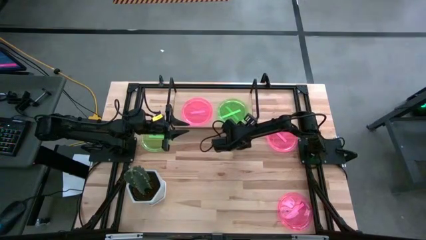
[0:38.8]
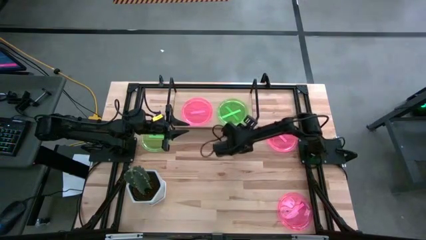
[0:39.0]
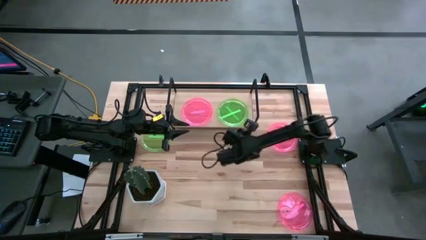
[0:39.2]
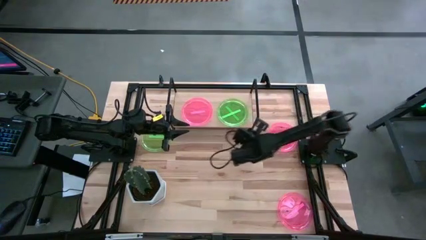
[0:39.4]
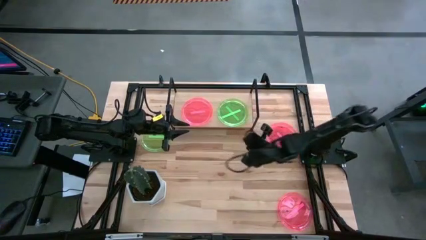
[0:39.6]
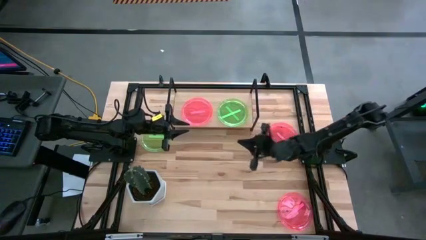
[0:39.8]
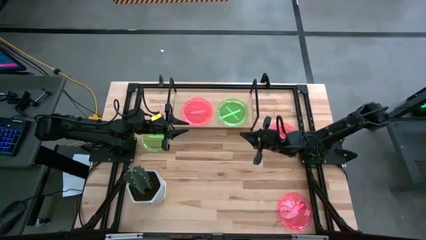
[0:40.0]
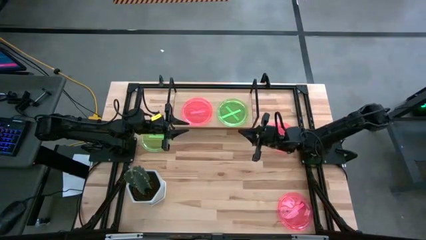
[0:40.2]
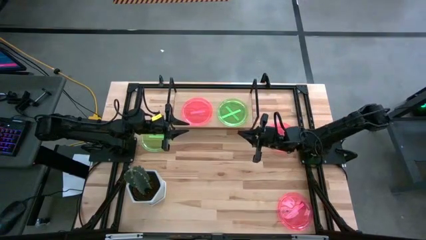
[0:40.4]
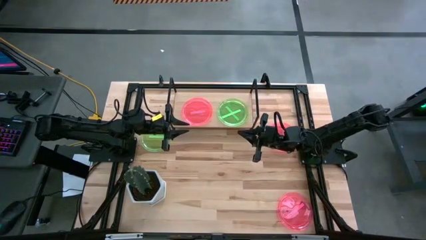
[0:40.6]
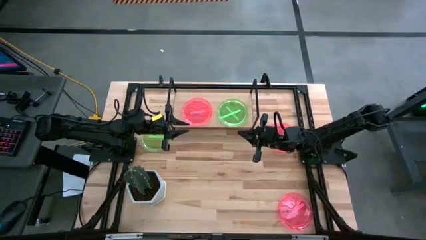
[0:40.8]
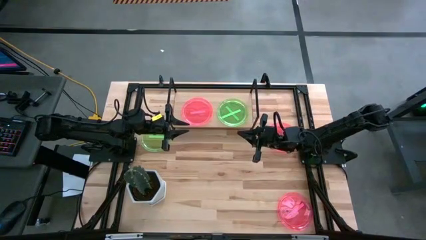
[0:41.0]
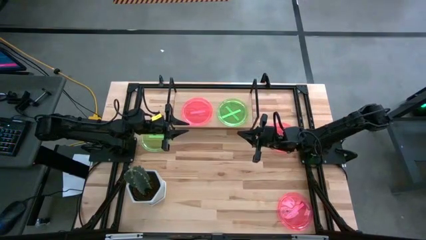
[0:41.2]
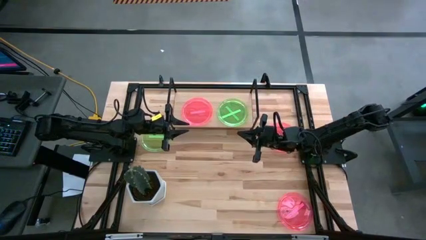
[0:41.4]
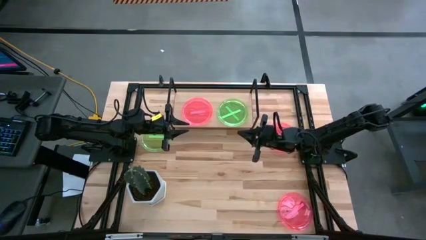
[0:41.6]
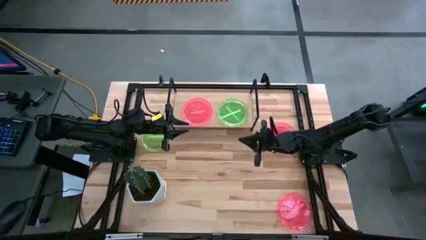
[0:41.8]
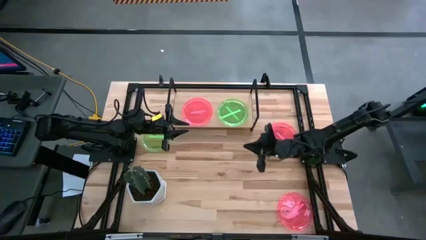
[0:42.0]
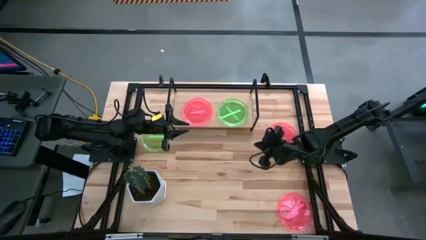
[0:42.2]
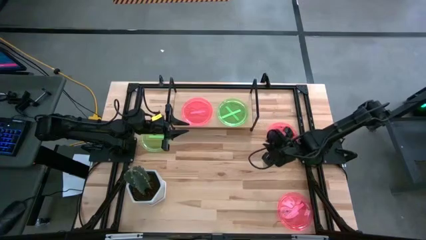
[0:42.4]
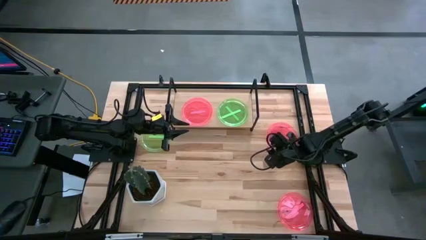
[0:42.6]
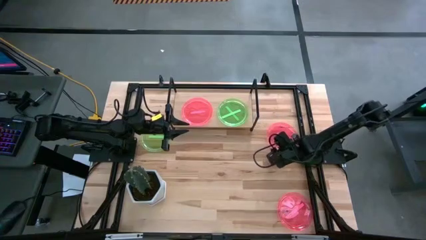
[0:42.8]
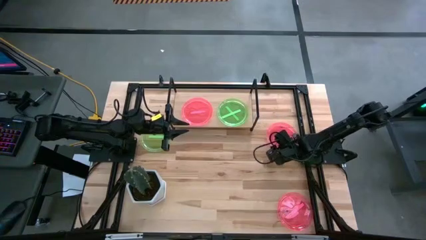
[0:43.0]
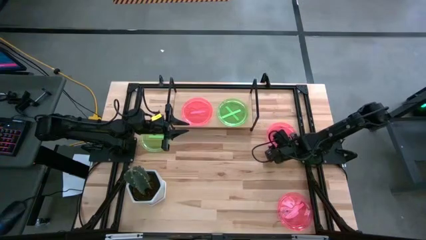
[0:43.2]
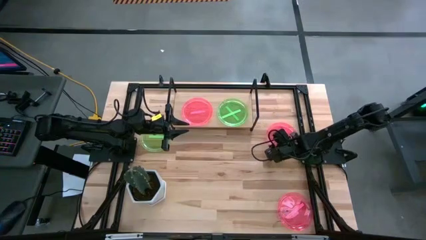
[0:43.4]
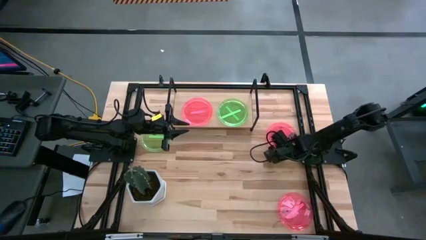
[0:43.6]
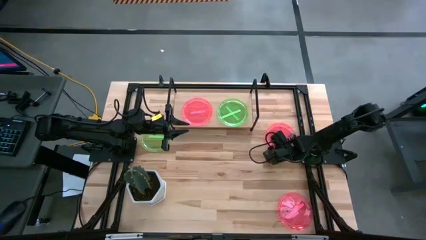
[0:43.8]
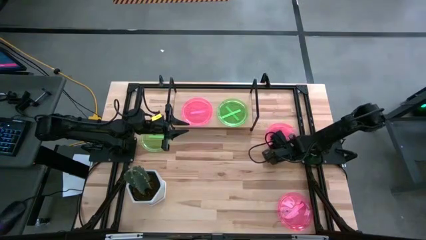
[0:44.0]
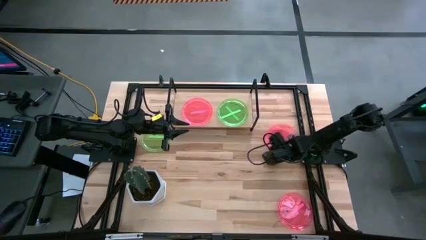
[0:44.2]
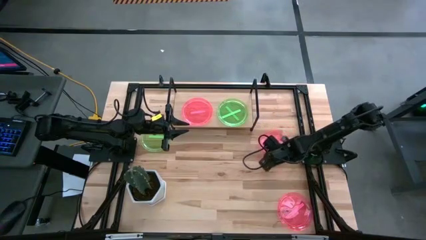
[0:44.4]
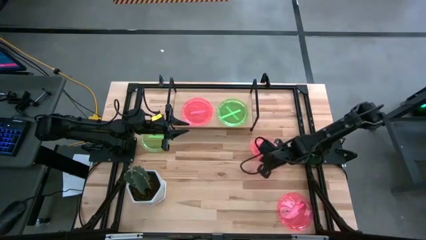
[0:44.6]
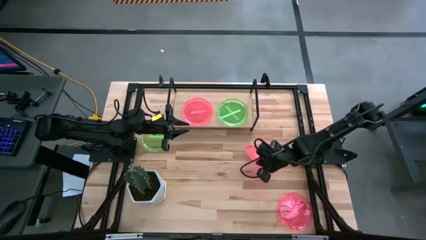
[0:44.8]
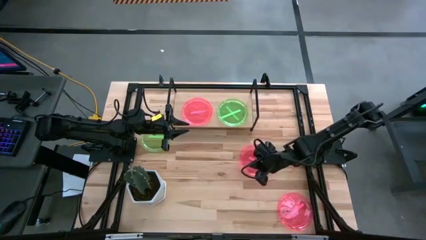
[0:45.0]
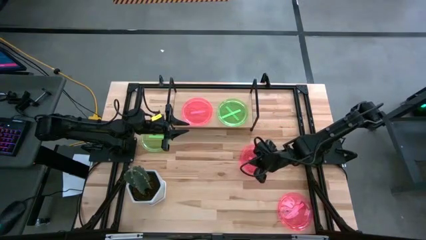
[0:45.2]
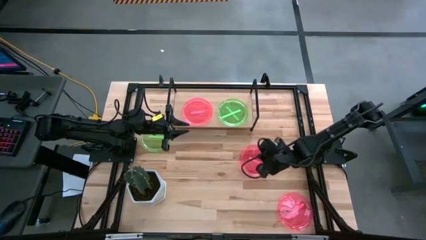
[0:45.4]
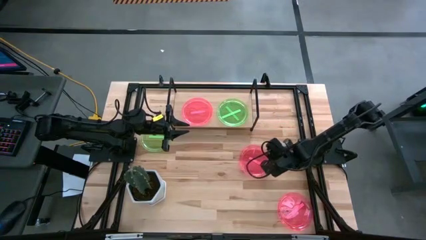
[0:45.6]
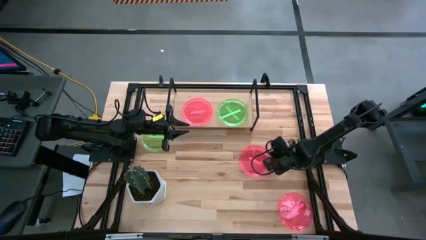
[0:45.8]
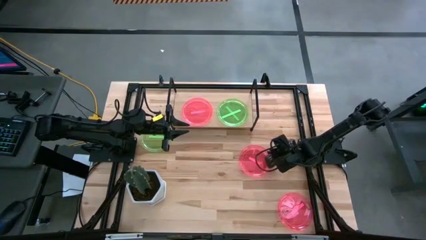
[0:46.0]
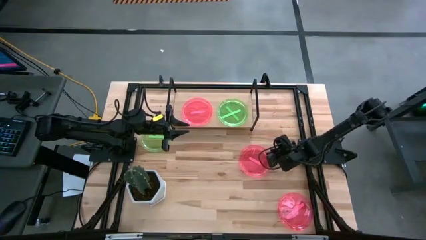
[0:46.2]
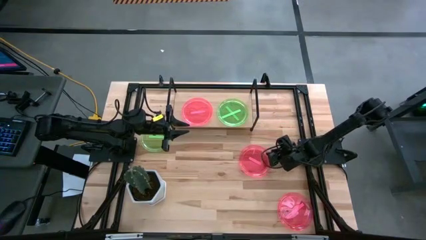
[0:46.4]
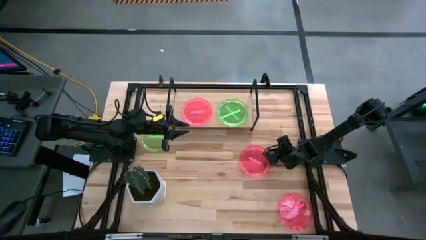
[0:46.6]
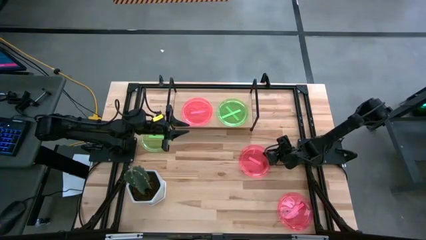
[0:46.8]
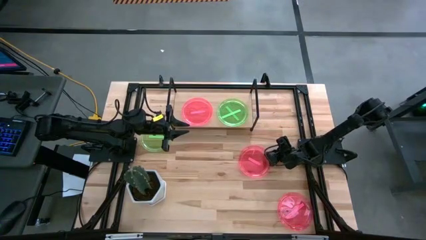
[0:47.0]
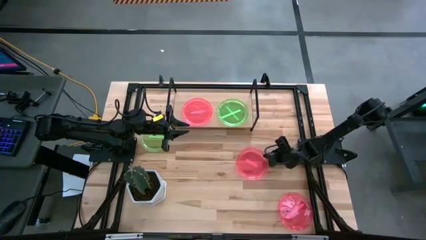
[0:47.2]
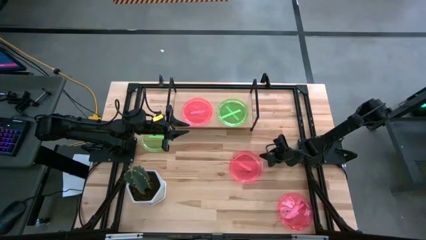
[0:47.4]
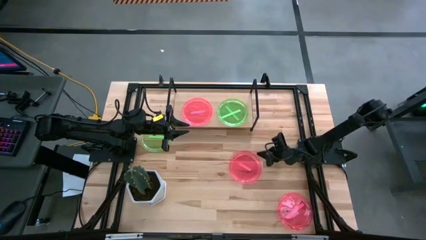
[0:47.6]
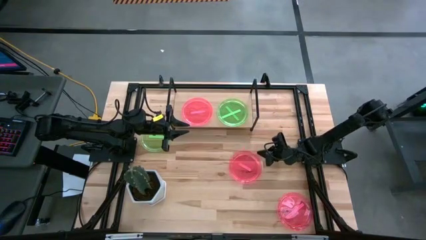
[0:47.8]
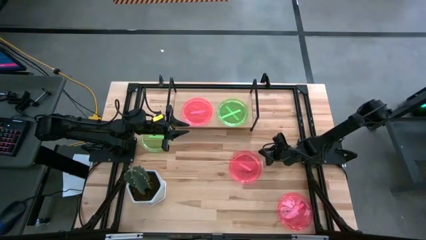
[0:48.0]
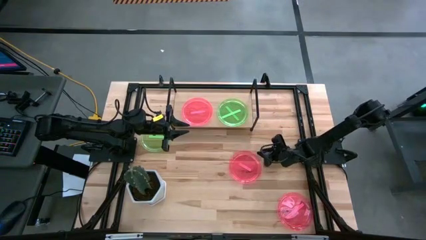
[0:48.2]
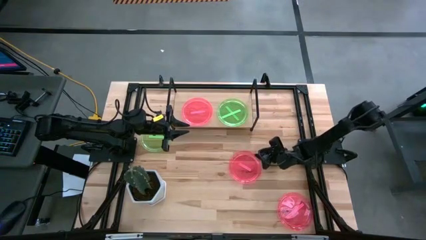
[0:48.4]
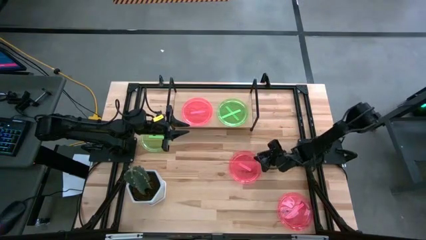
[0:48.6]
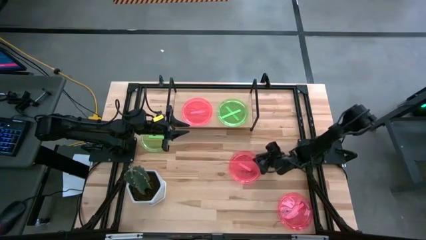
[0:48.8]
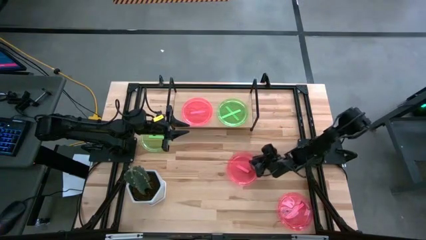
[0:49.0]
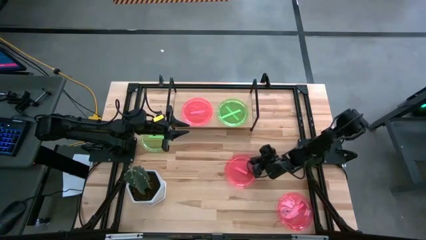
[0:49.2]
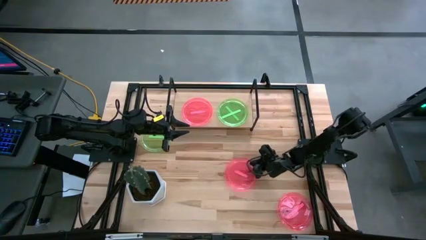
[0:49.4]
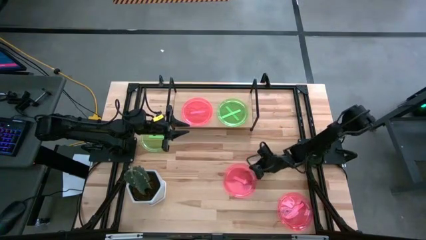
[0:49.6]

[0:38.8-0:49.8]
Task: Place and stack plates onto a shelf
Stack the top pink plate on top of the other pink plate on the shelf

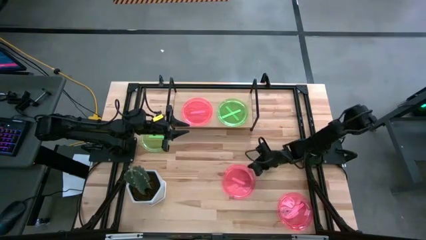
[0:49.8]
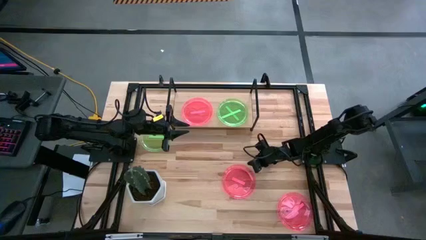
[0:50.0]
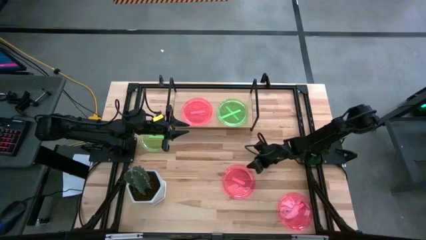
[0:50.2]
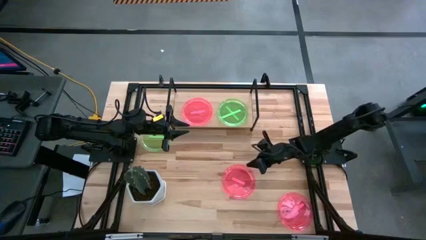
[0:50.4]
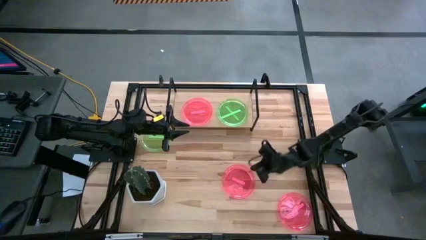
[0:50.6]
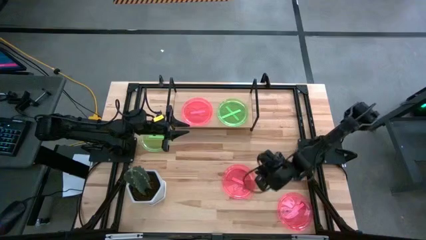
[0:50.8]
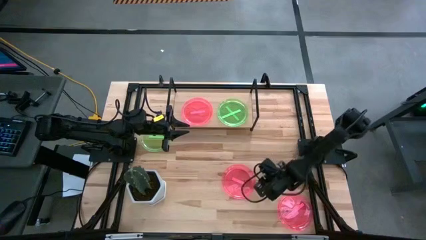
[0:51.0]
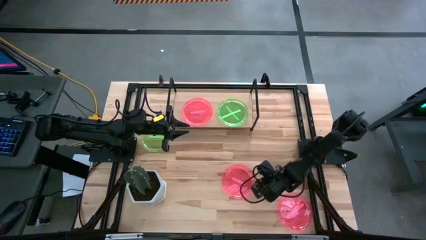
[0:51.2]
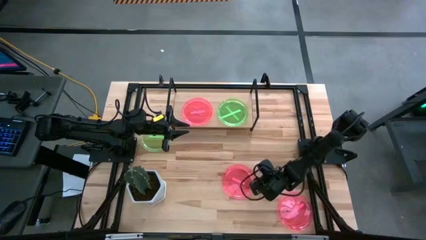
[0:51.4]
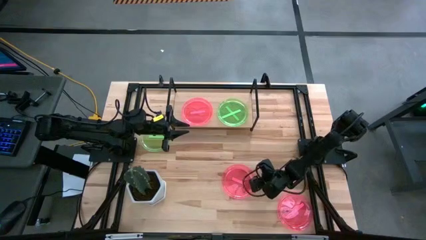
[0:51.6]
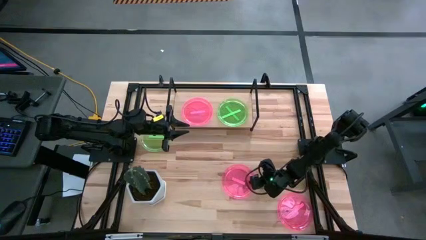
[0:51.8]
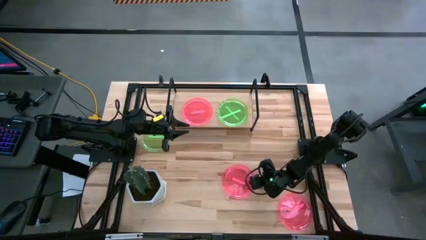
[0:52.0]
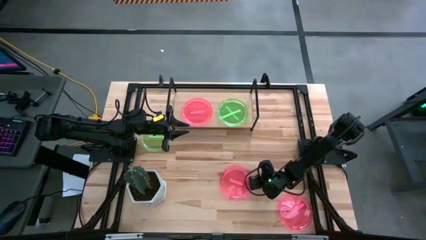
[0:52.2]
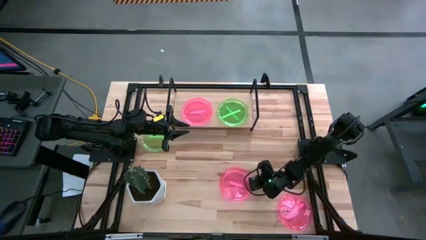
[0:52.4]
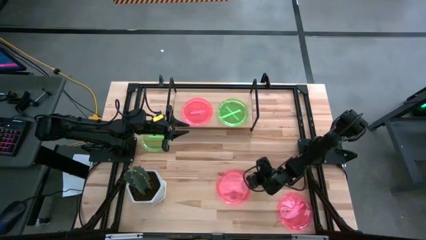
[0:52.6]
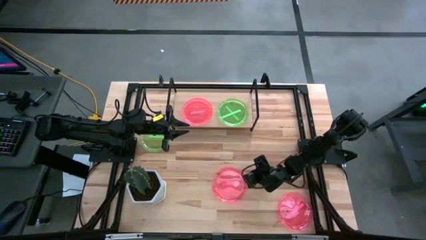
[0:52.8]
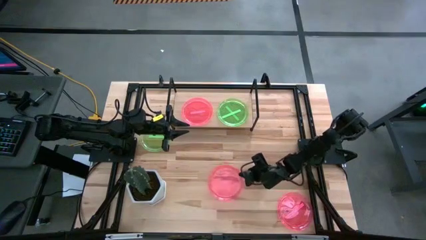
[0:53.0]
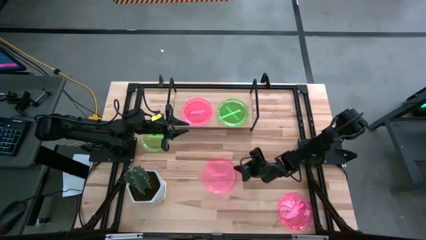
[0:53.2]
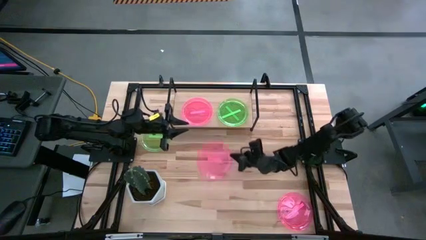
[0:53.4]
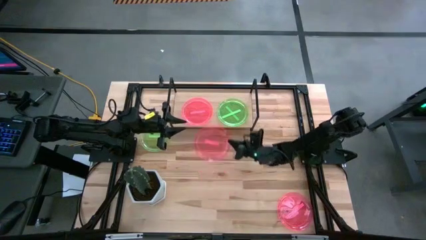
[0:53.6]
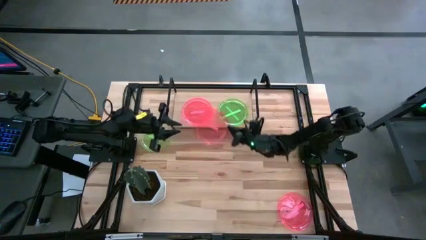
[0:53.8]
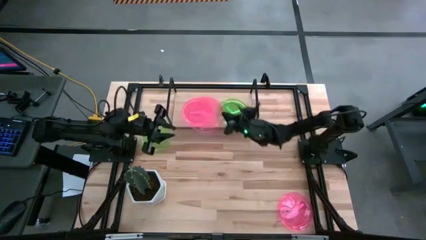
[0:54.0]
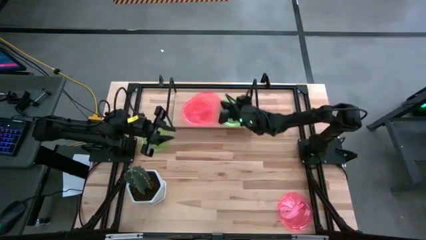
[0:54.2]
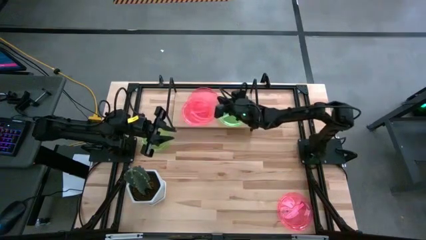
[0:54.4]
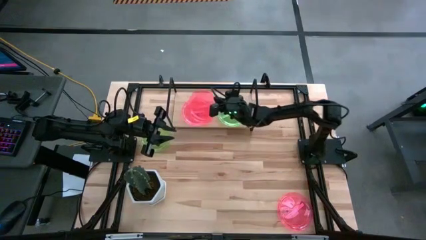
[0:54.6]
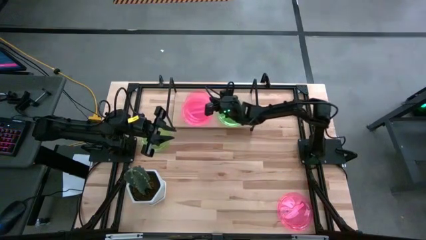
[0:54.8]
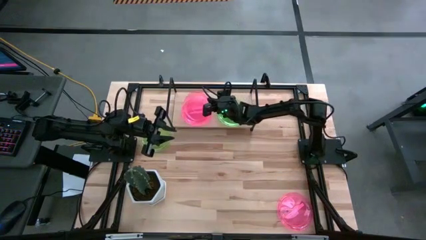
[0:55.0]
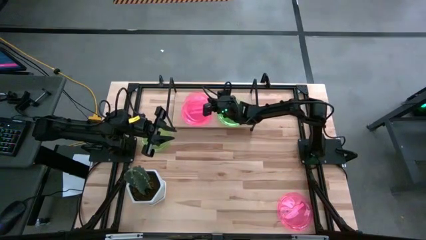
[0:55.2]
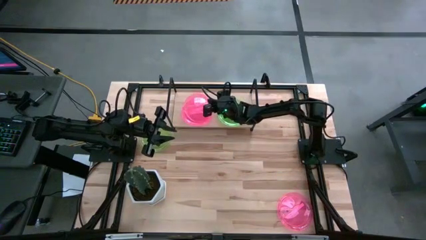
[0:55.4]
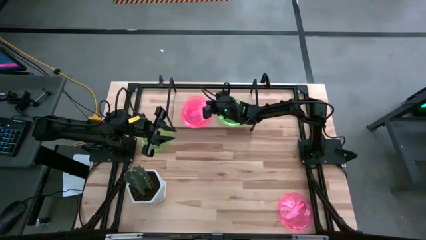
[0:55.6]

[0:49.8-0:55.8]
Stack the top pink plate on top of the other pink plate on the shelf
